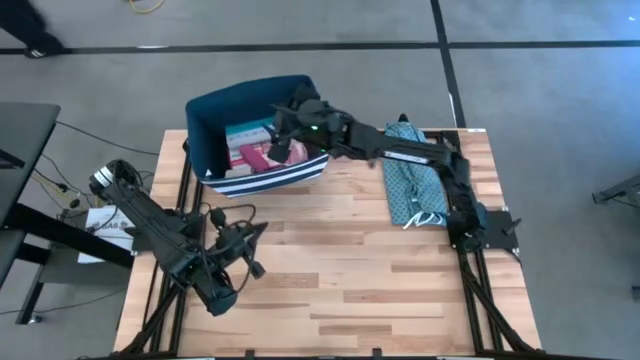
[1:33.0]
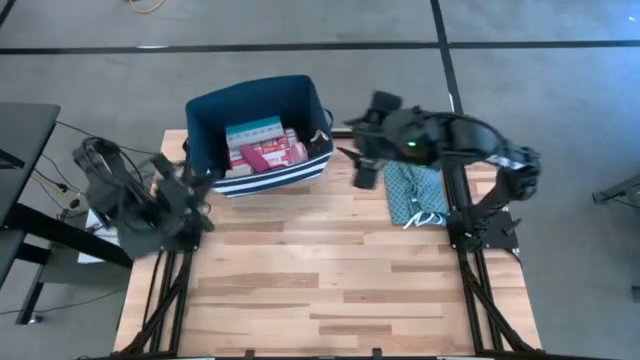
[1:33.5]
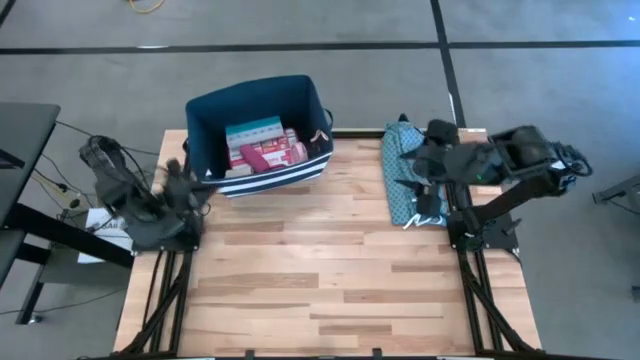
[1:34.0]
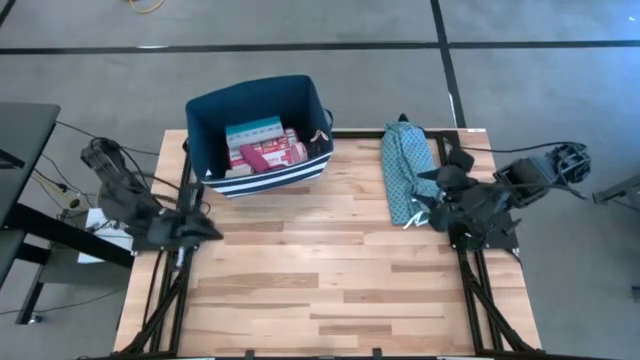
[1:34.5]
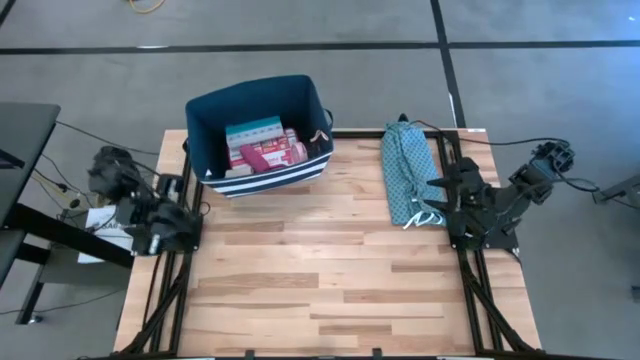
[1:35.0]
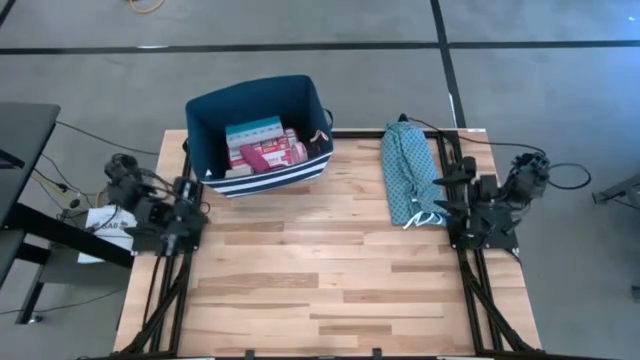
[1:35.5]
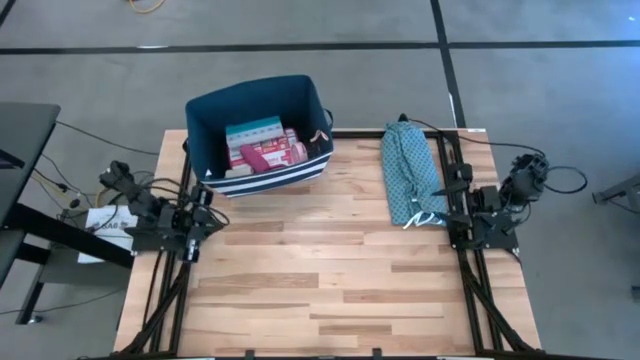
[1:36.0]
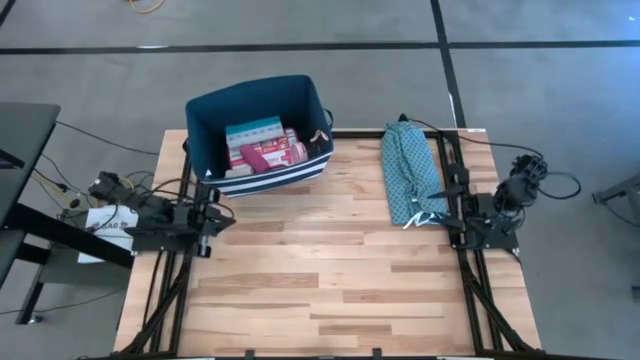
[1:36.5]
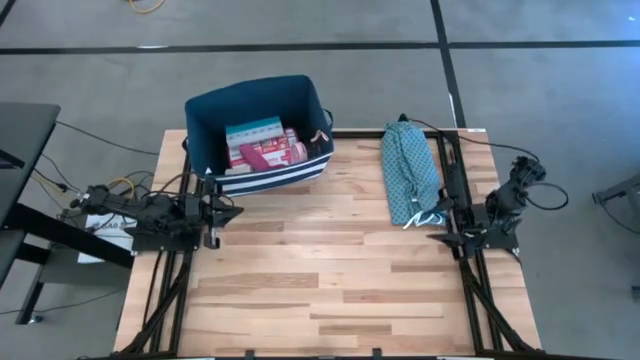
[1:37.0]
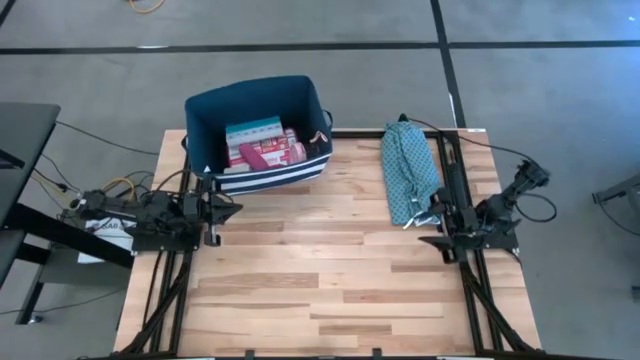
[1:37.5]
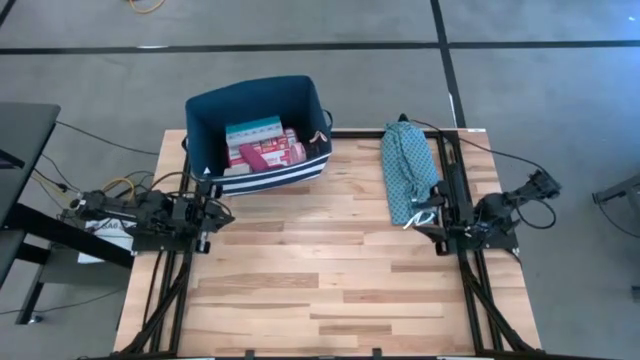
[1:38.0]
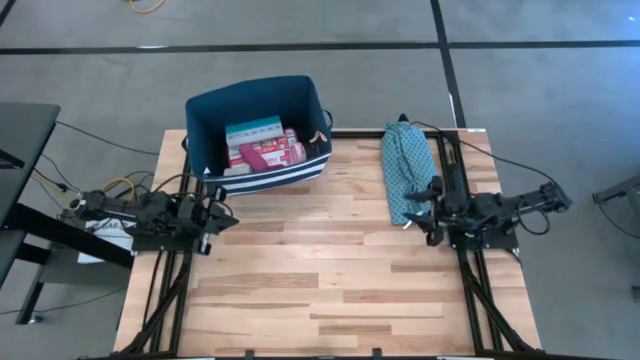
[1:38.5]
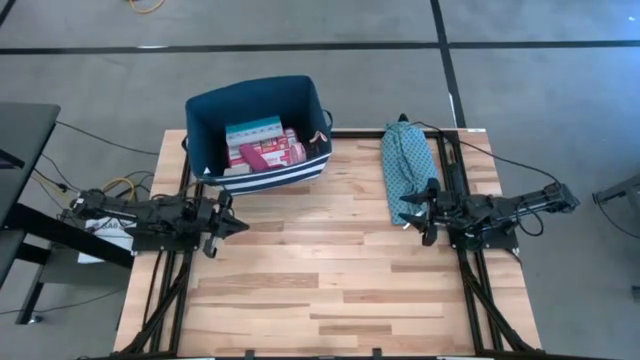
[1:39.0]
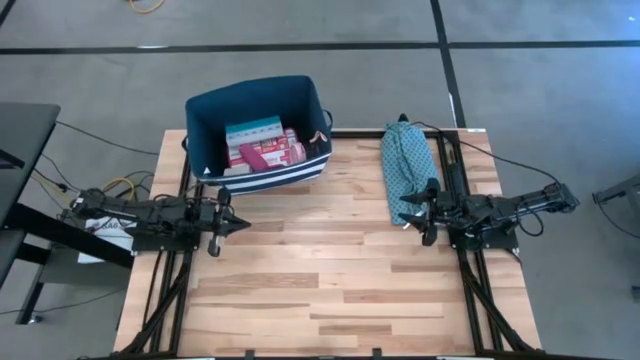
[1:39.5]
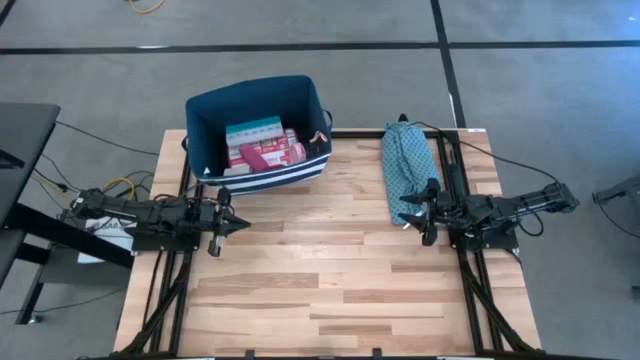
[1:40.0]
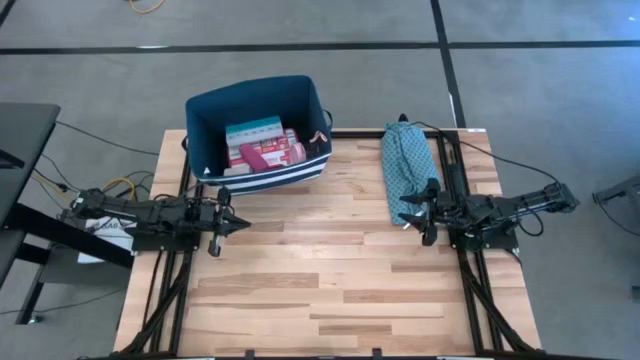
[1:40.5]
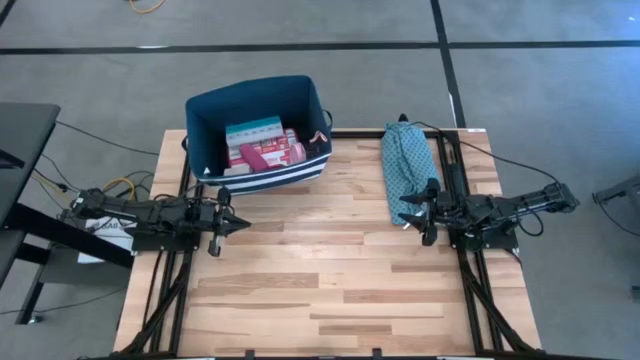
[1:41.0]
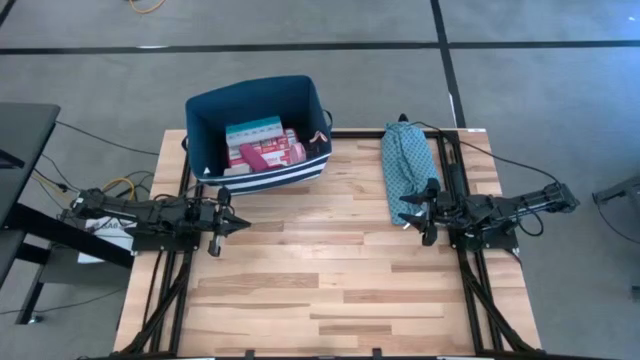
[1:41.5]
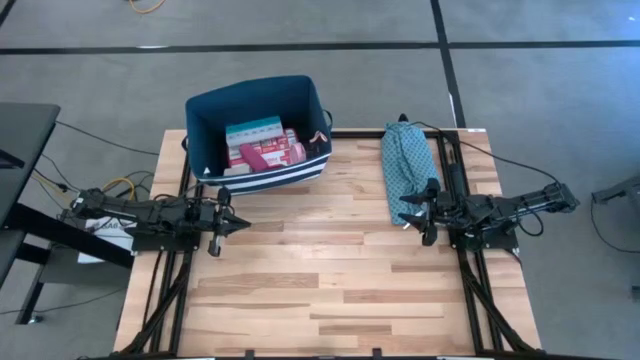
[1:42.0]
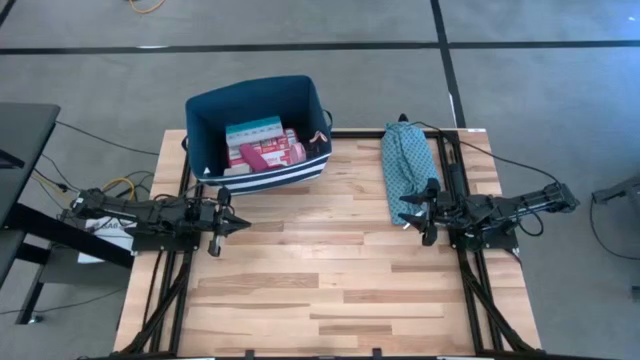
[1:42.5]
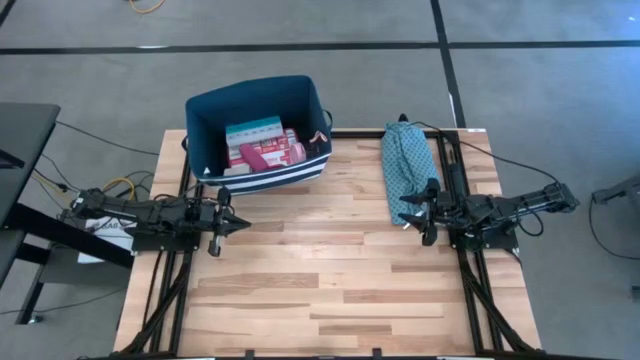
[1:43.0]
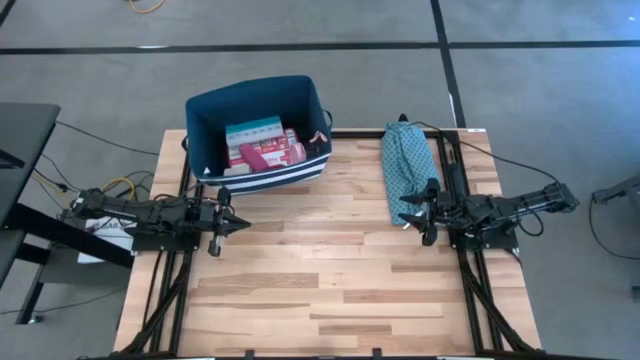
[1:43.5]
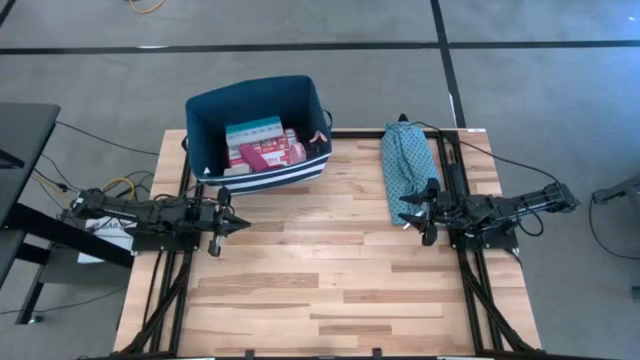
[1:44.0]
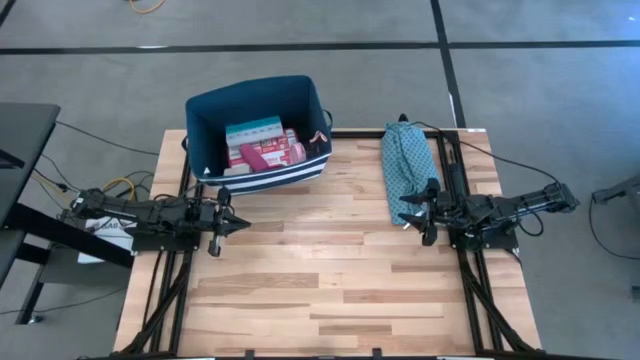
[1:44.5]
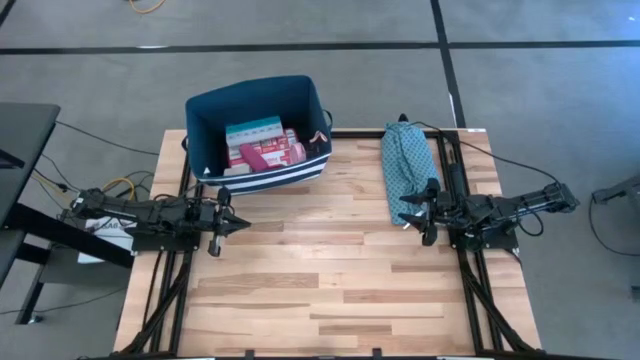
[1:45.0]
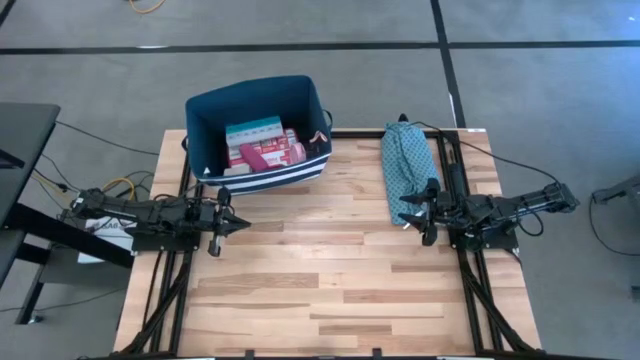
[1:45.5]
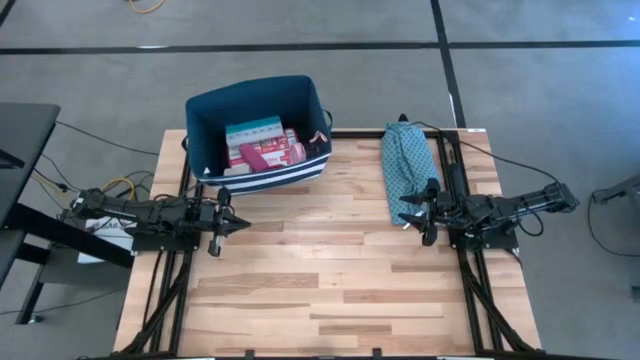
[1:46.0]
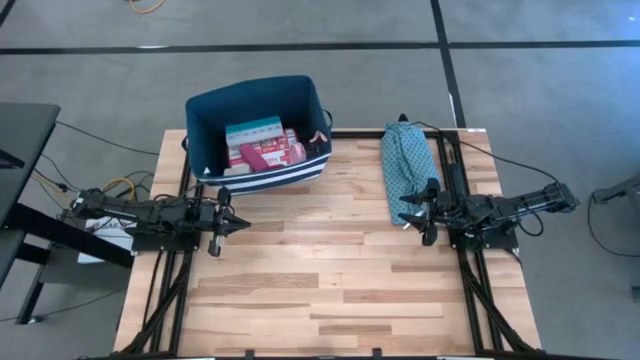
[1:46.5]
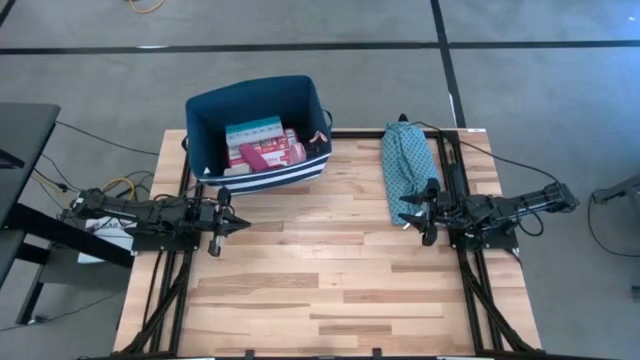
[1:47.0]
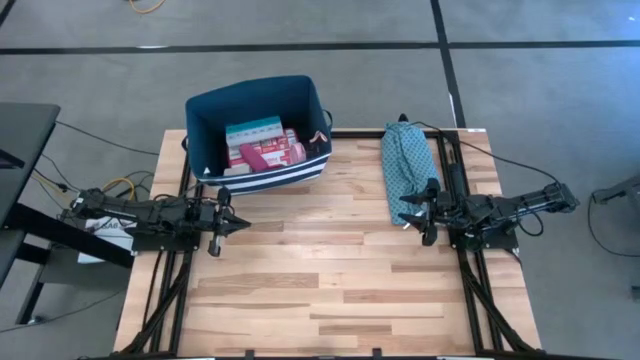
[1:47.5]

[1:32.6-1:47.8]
Task: Pick & place medical supplies in basket/bin
Return to Home Position

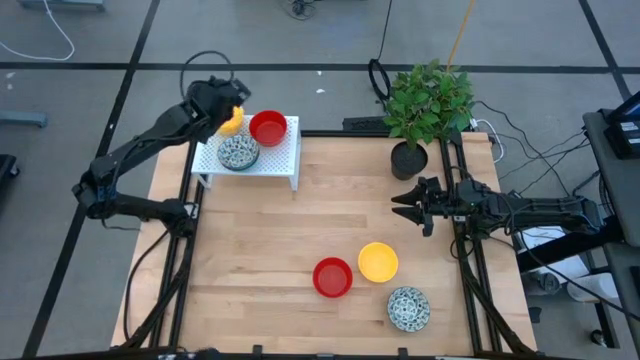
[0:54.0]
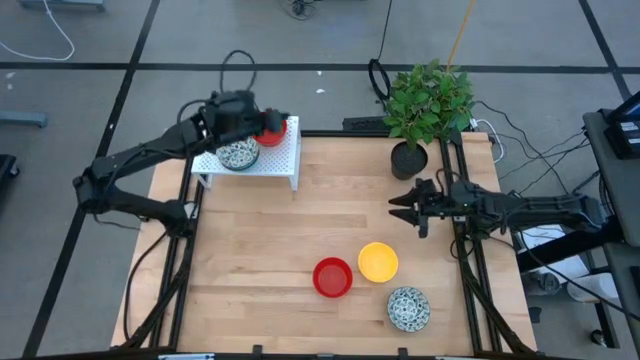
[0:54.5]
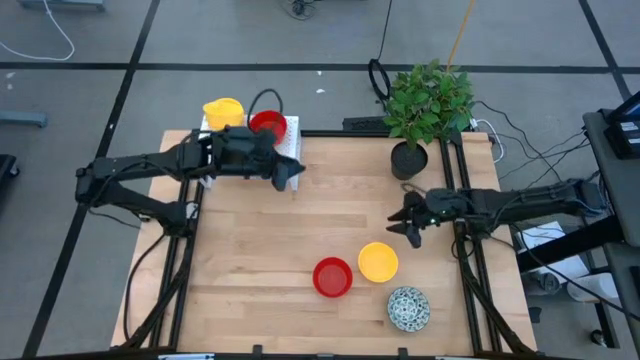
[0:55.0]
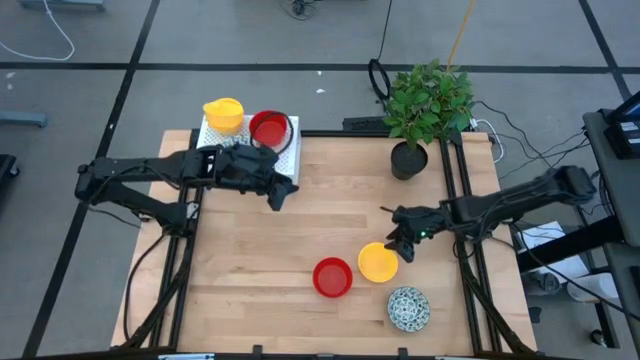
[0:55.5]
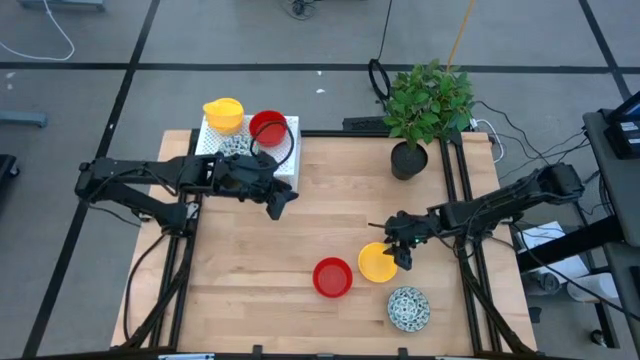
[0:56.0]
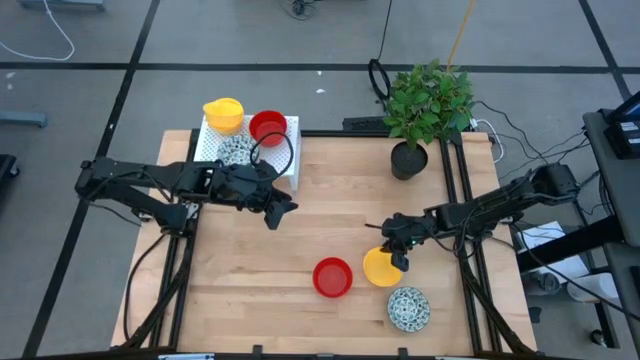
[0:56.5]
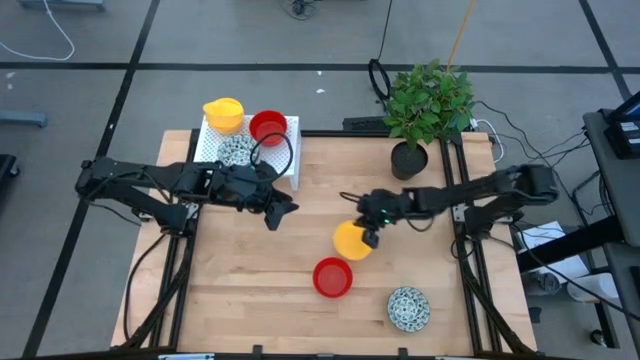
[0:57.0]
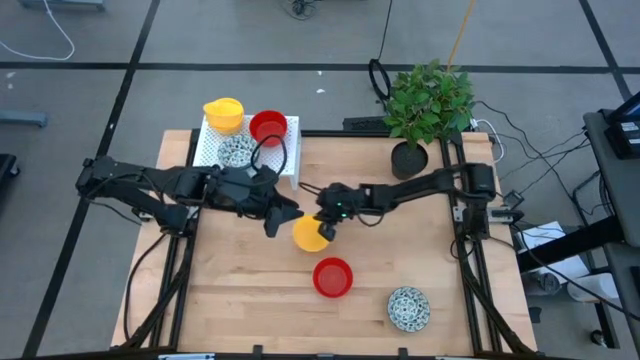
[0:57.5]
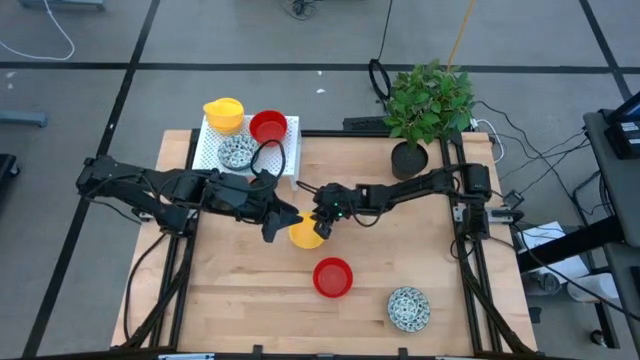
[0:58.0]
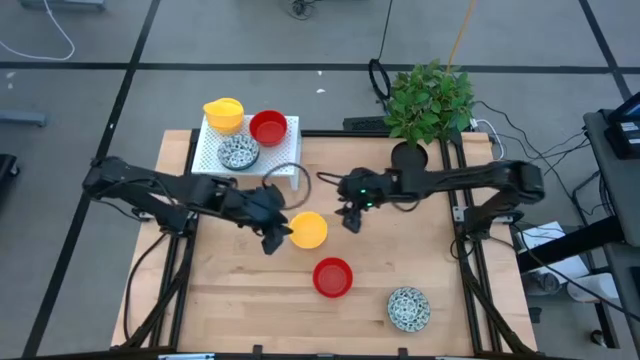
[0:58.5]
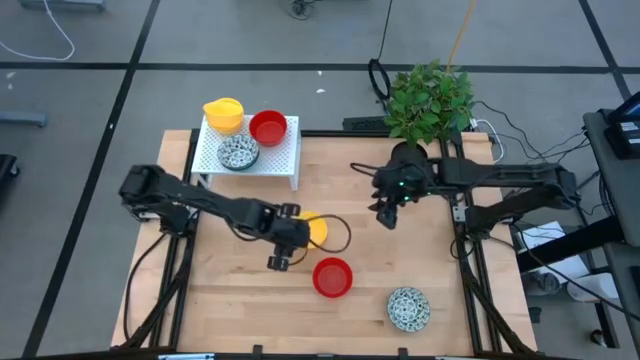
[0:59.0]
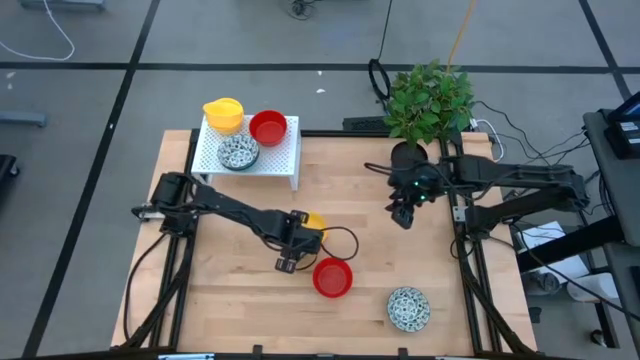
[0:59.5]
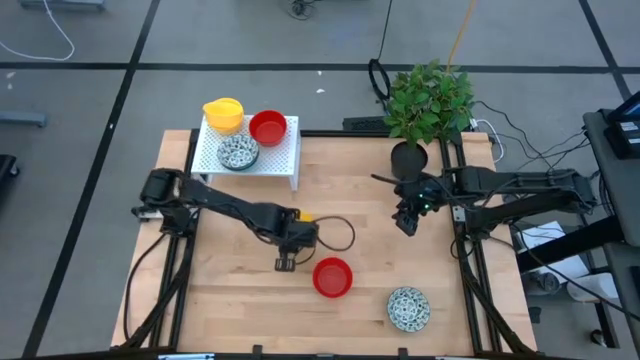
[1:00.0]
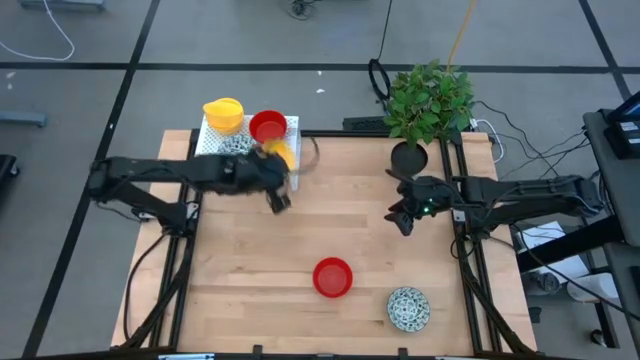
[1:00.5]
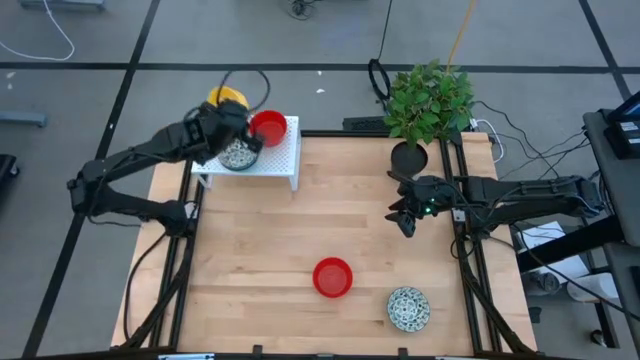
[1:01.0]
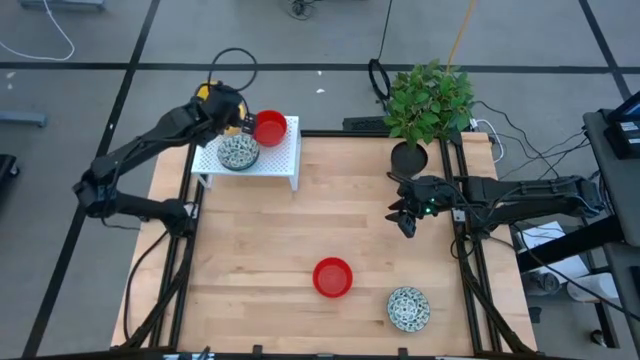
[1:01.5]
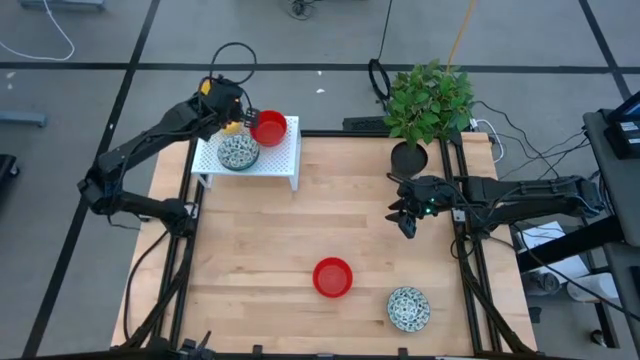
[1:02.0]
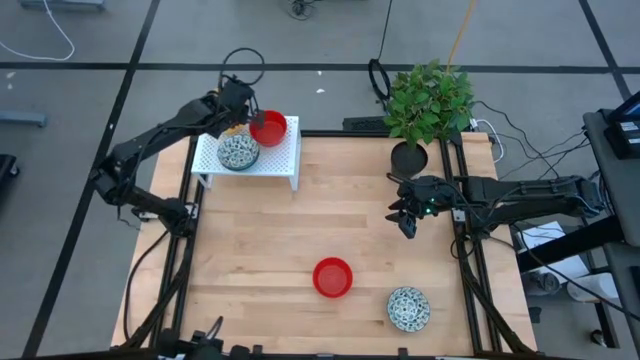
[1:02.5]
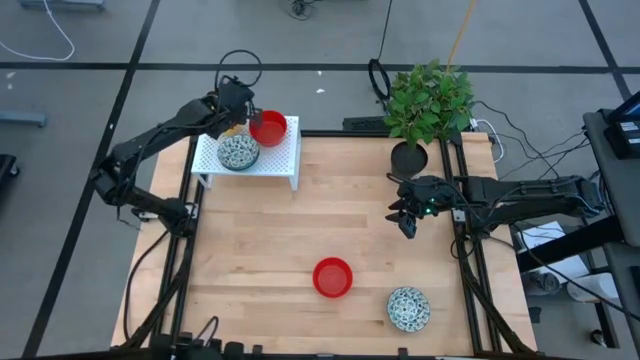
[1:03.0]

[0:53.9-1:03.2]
Task: Pick & Place Mini bowls
Stack the yellow bowl on the yellow bowl on the shelf
